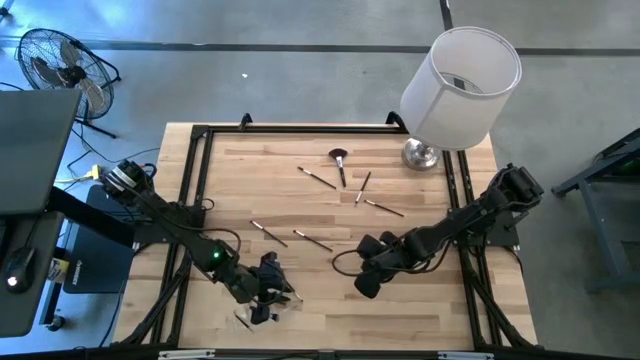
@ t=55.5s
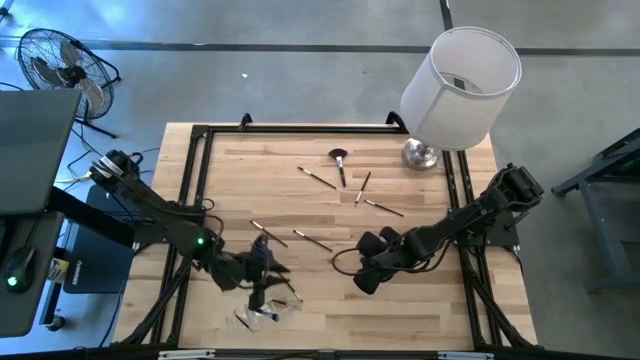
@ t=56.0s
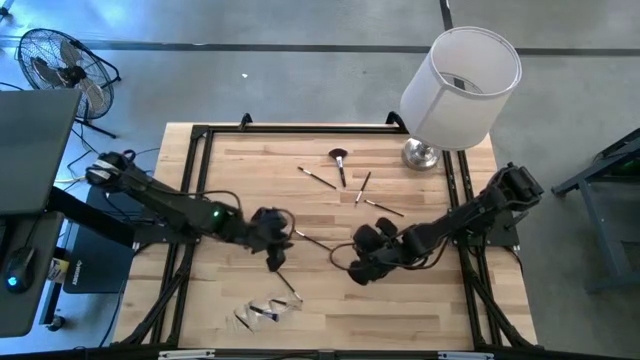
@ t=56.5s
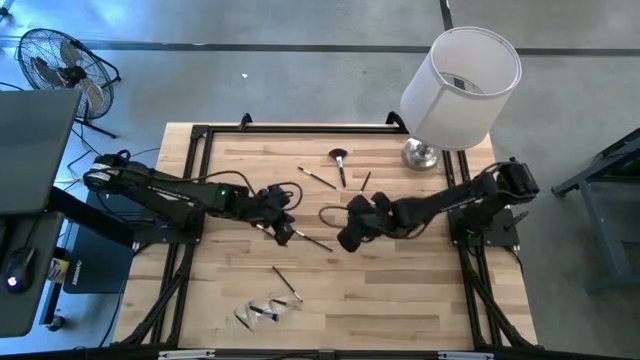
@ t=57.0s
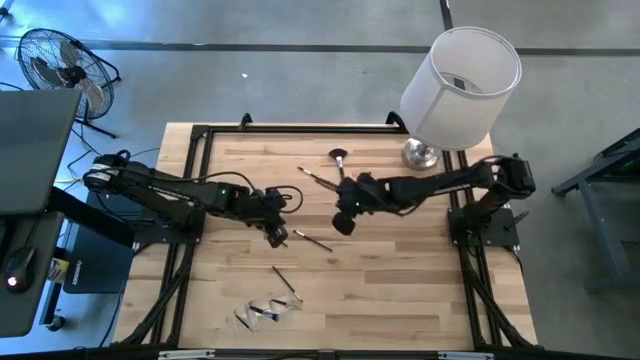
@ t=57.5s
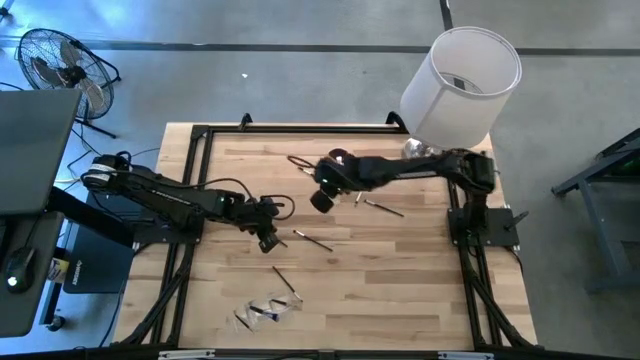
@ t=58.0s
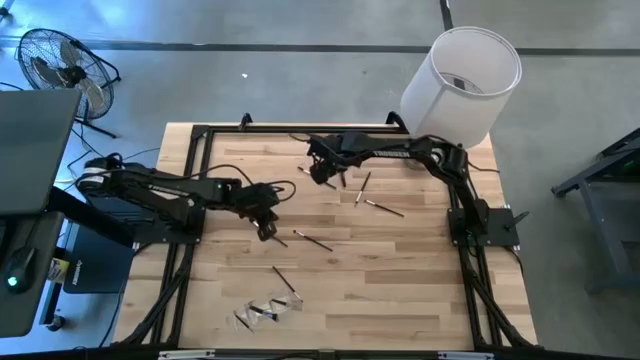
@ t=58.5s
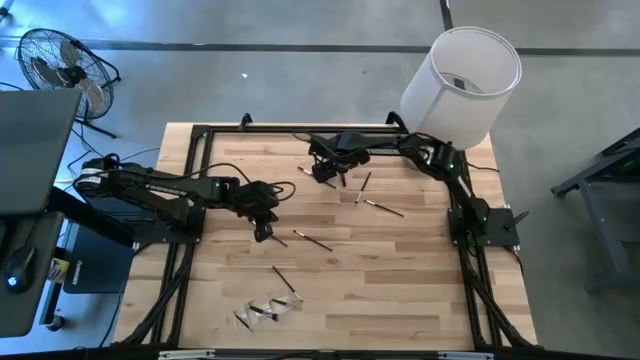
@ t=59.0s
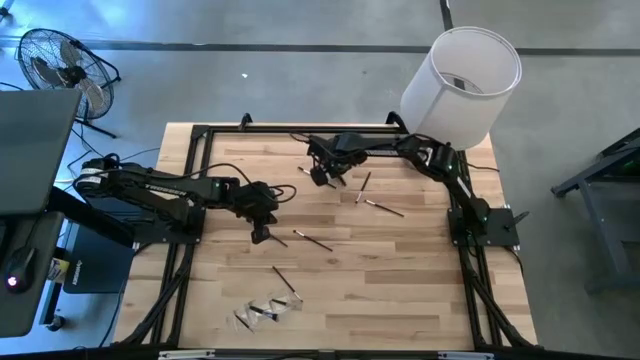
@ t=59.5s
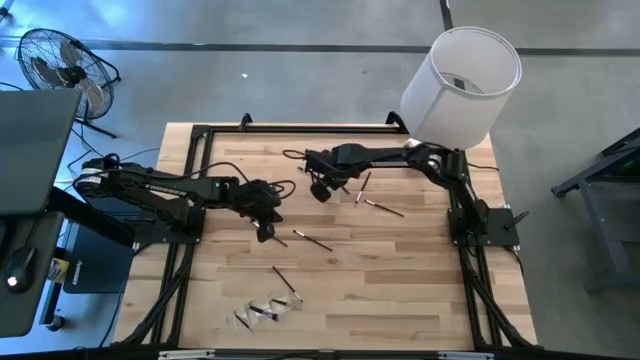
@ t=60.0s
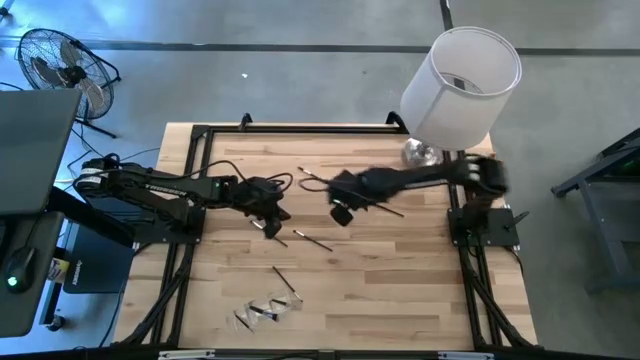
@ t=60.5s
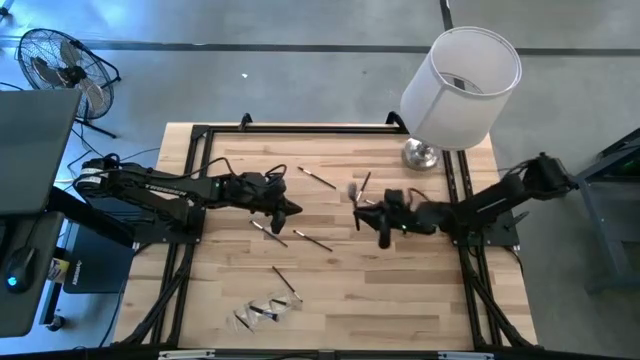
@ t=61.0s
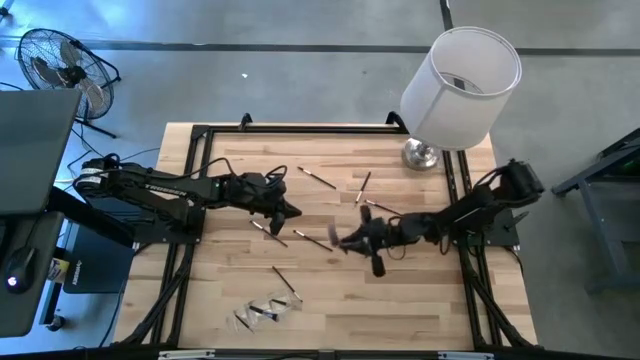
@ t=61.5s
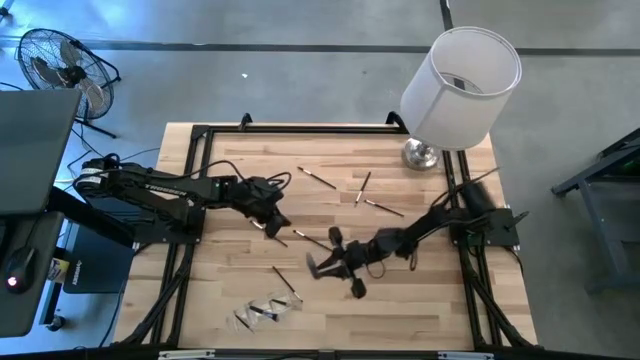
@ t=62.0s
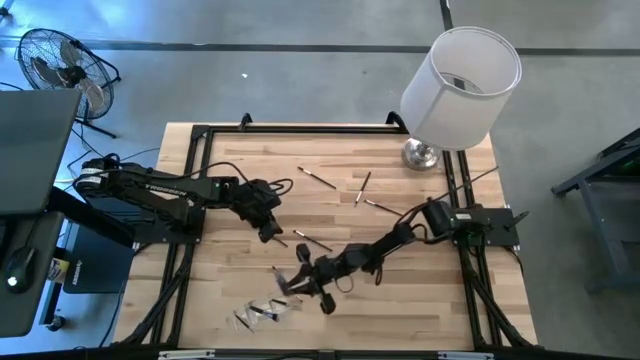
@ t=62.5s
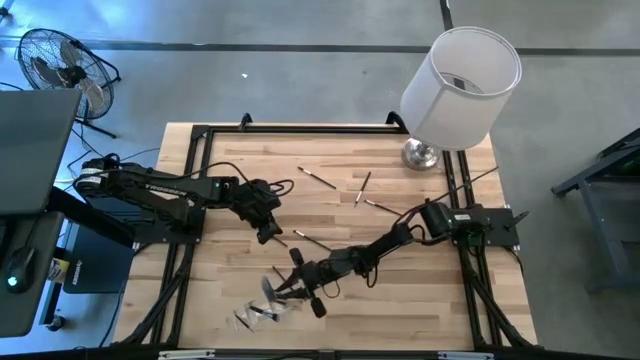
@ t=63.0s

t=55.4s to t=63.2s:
Task: Pick & Place Makeup Supplies
Put the silver makeup brush into the transparent organizer

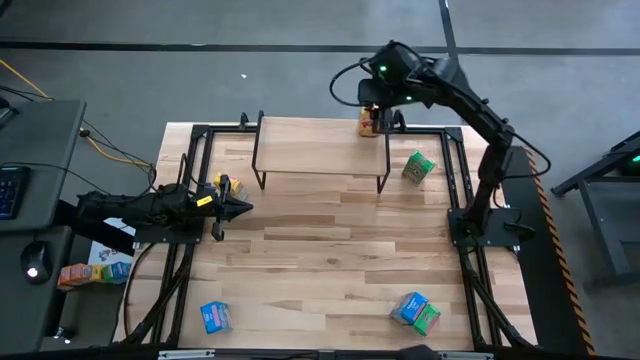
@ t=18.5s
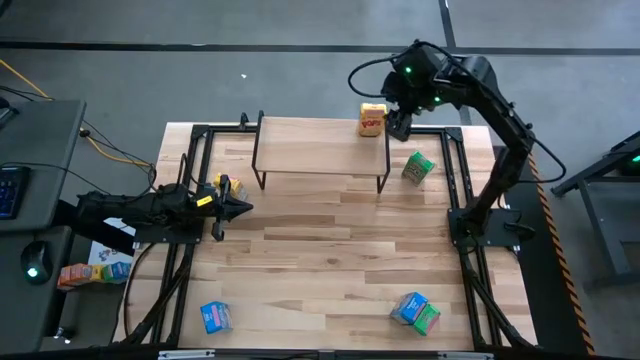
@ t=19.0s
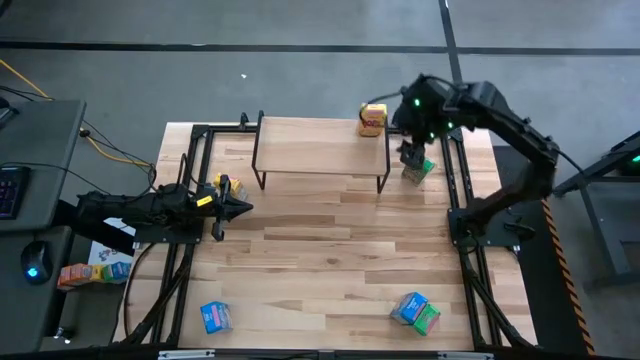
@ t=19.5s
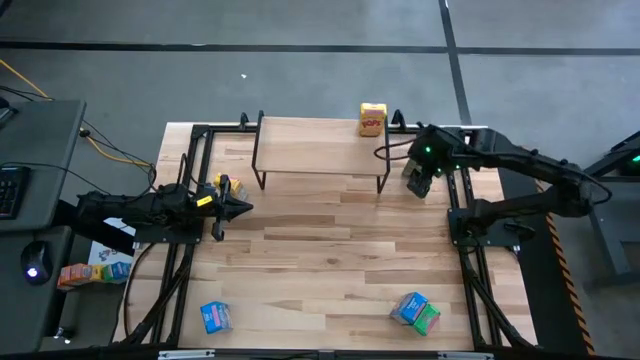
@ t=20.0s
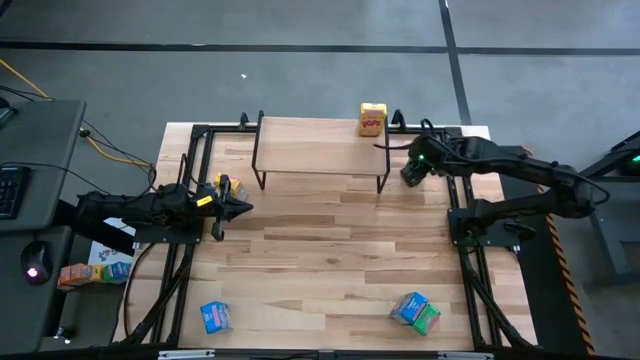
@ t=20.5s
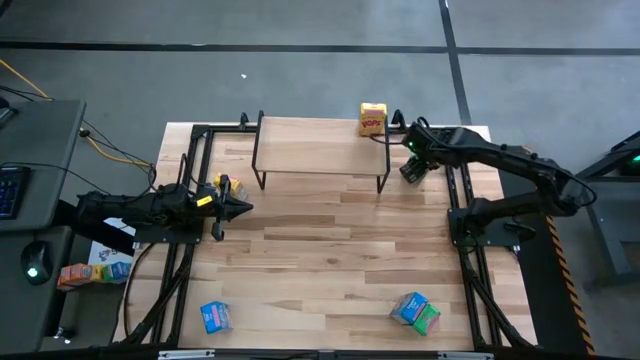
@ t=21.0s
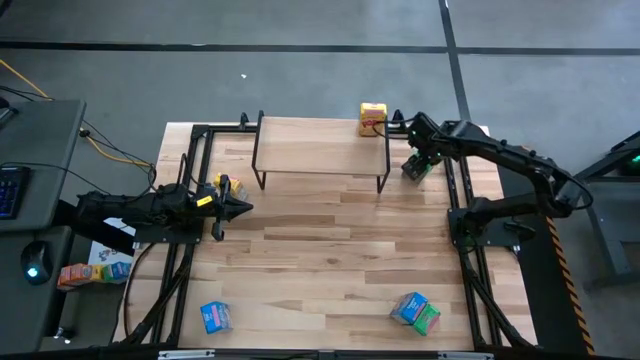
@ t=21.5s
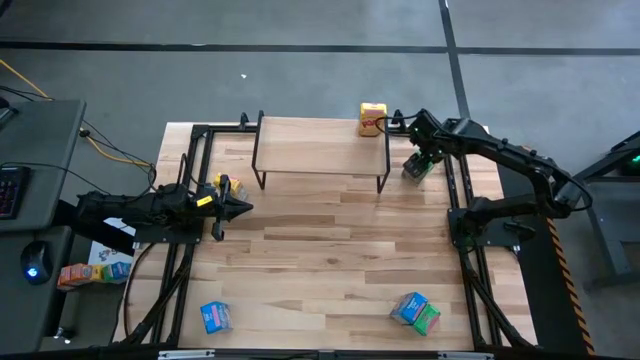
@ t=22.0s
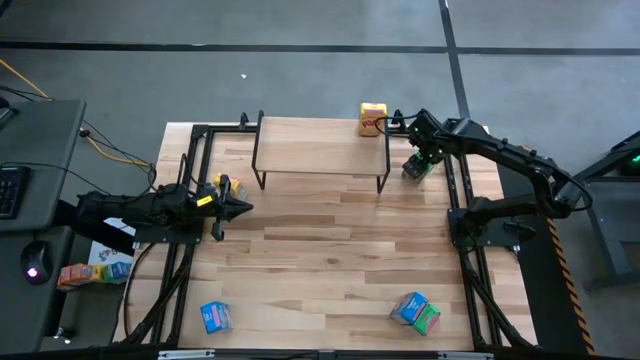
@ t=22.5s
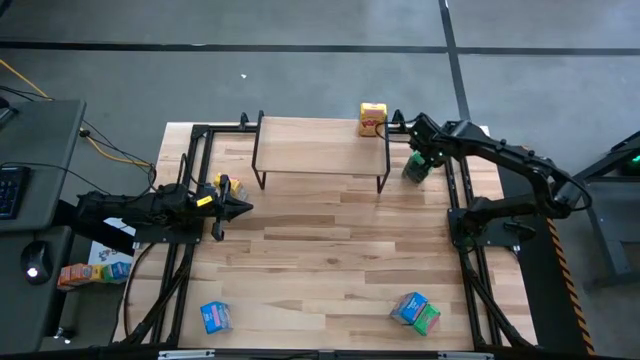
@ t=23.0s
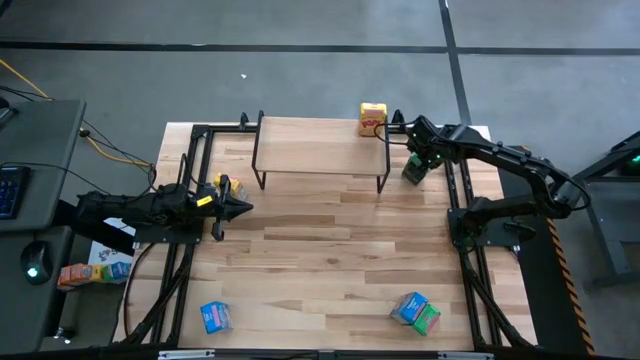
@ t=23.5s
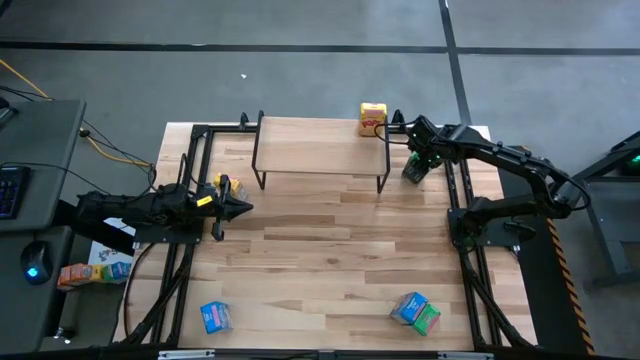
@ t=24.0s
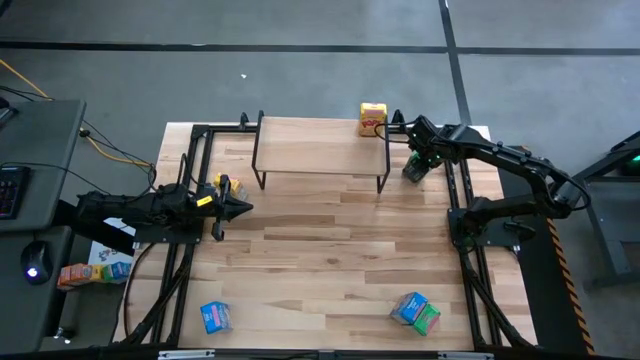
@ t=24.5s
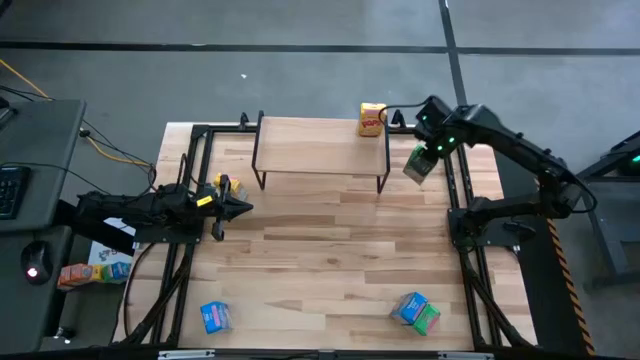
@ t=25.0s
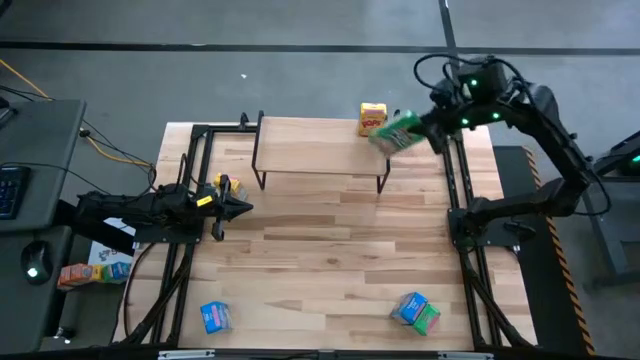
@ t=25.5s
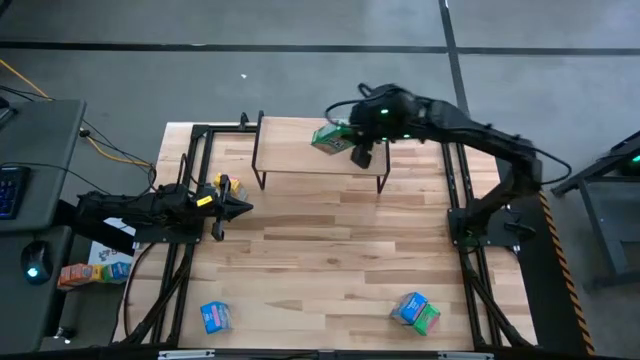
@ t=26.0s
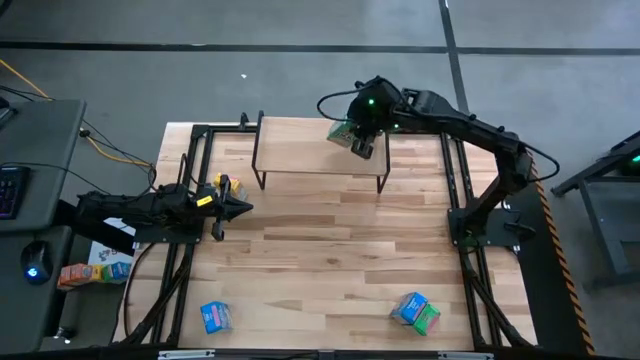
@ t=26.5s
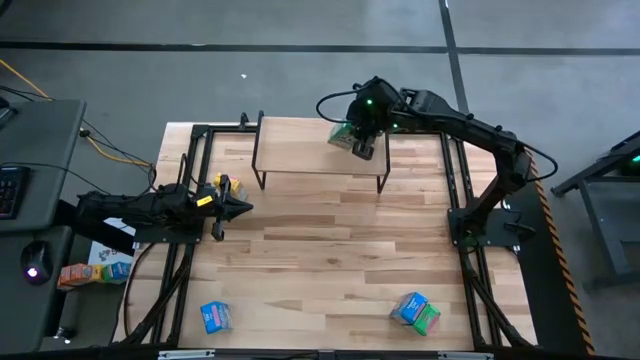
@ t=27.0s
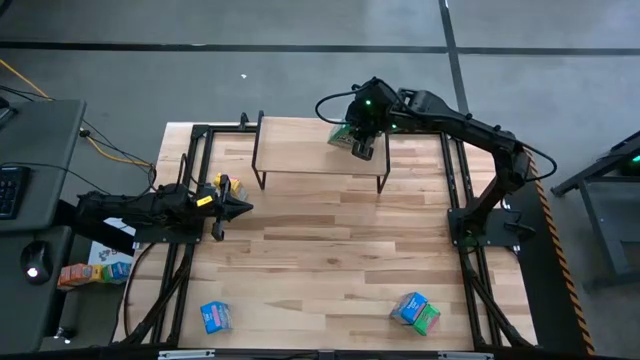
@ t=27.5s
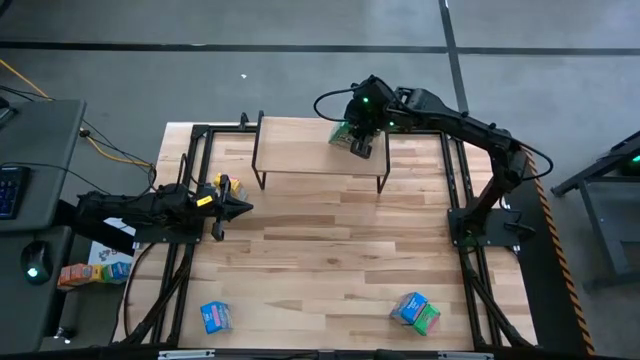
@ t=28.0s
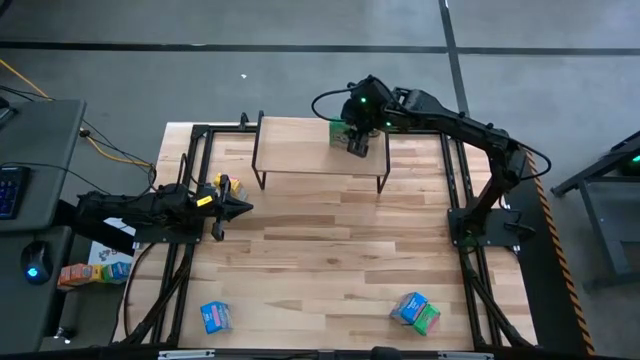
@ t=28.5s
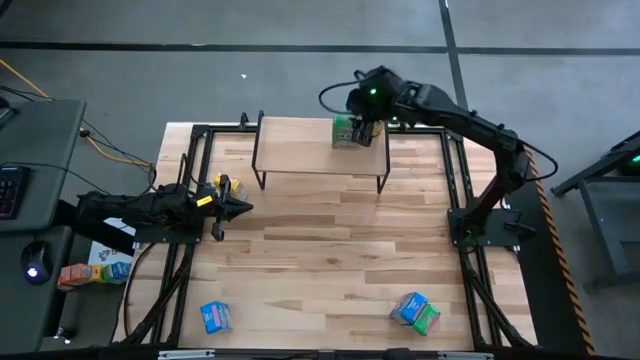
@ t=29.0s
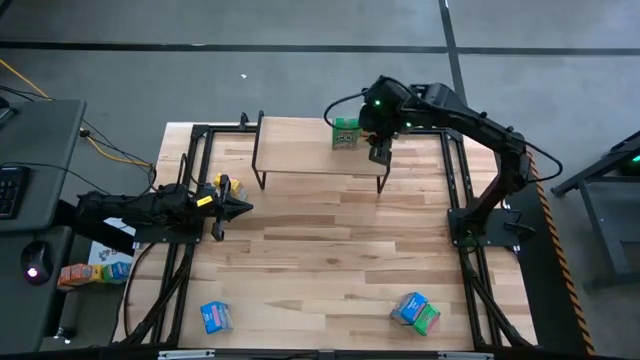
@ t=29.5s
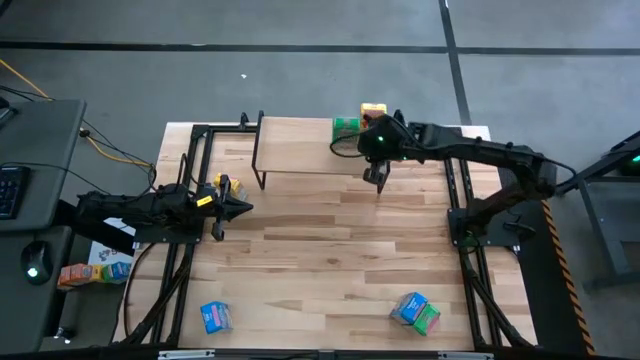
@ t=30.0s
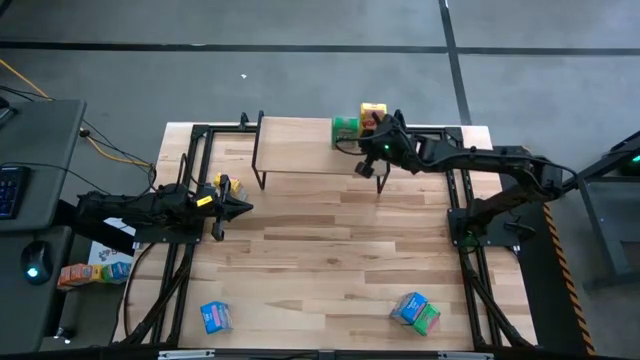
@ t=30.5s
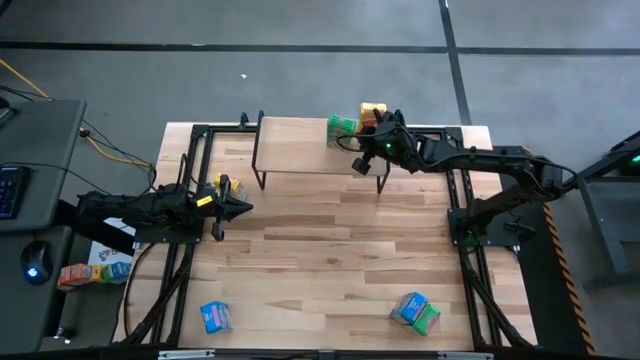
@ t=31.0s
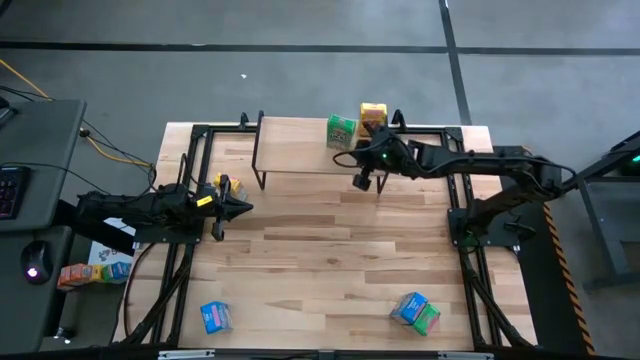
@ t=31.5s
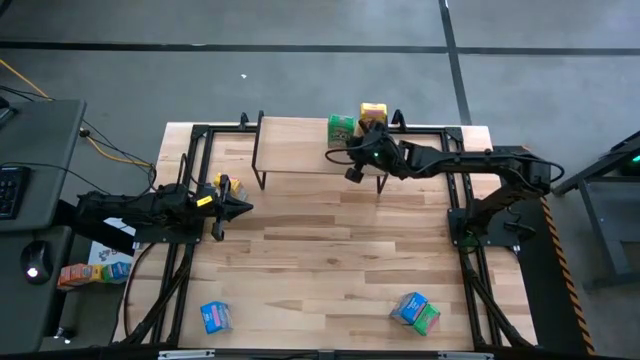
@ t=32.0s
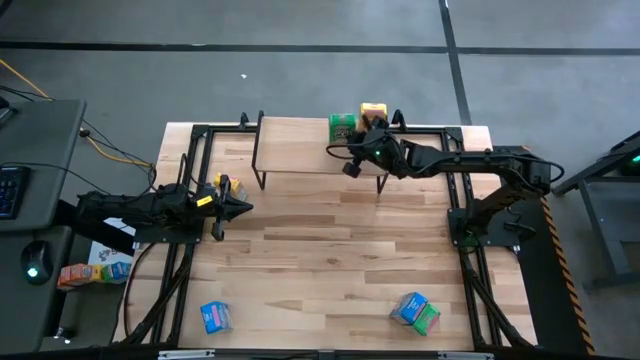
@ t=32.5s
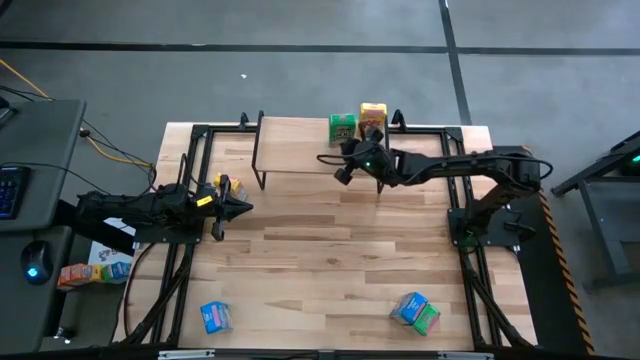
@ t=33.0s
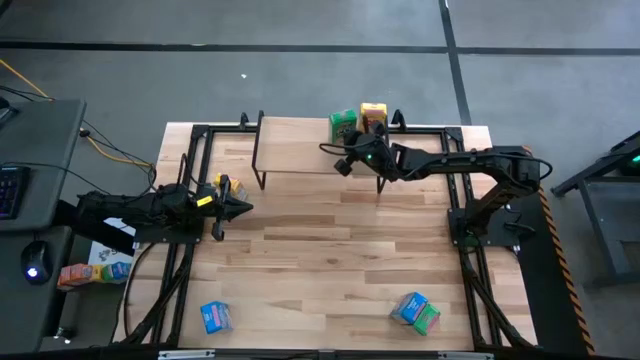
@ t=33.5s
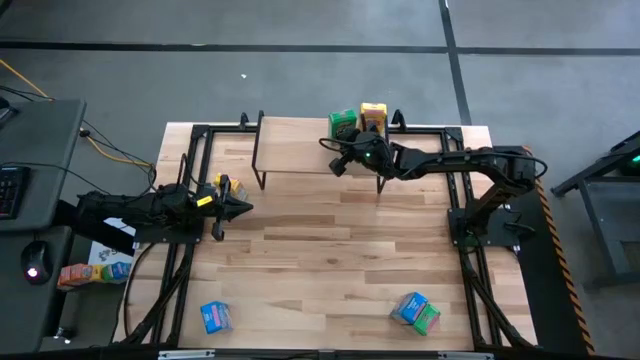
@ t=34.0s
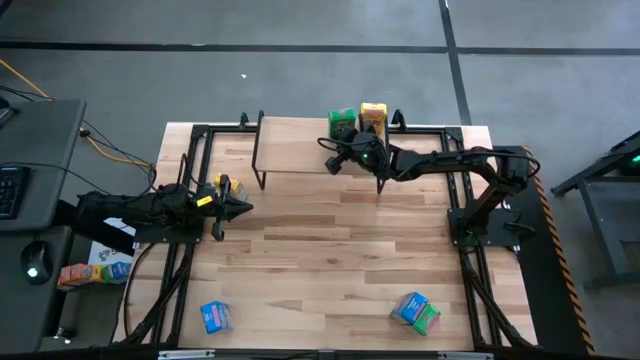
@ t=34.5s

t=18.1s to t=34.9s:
Task: Stack cereal on shelf
Put the top green cereal box on the shelf
